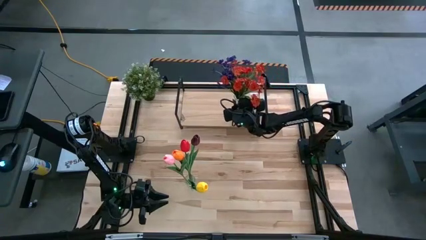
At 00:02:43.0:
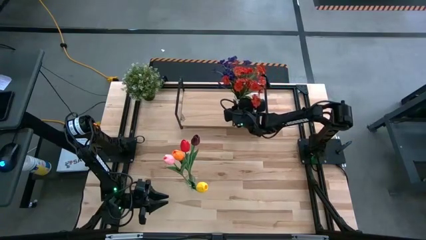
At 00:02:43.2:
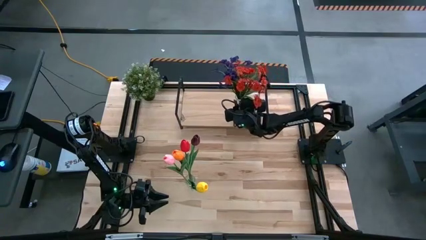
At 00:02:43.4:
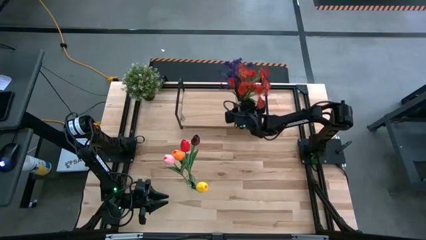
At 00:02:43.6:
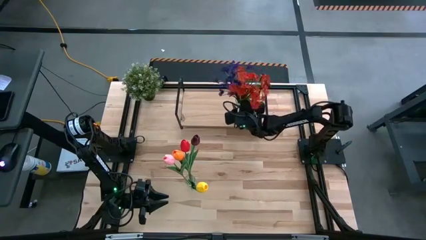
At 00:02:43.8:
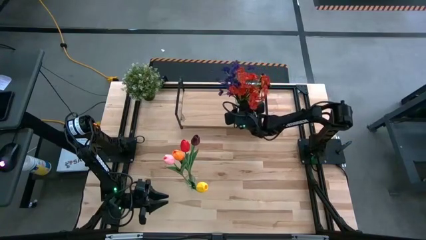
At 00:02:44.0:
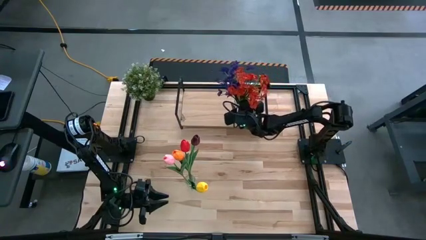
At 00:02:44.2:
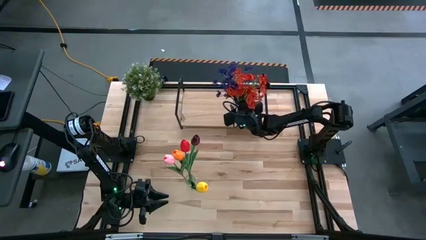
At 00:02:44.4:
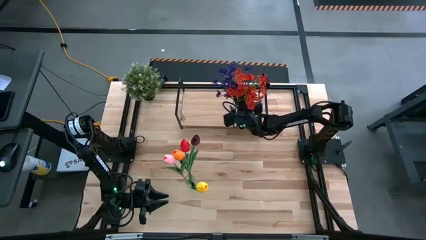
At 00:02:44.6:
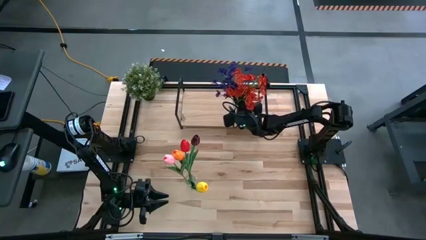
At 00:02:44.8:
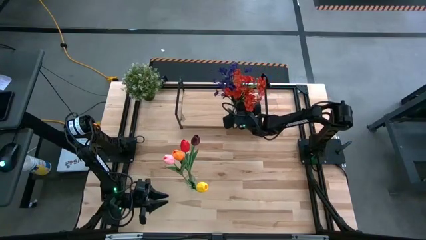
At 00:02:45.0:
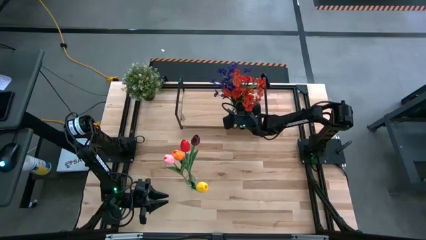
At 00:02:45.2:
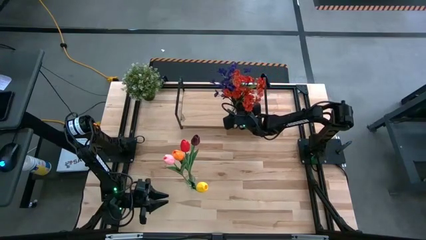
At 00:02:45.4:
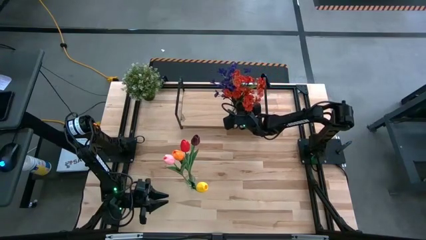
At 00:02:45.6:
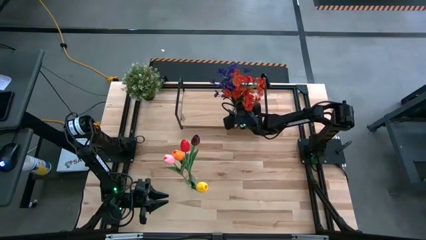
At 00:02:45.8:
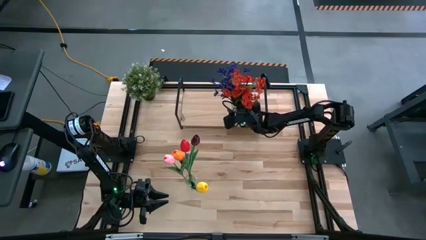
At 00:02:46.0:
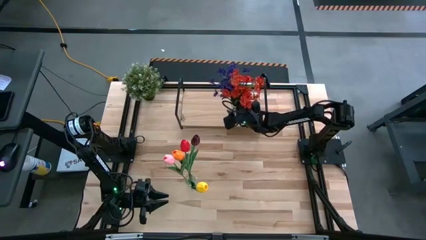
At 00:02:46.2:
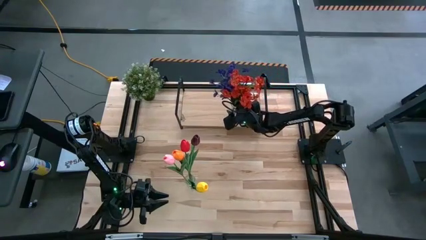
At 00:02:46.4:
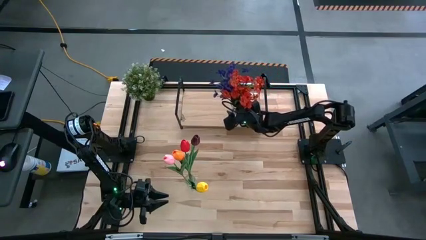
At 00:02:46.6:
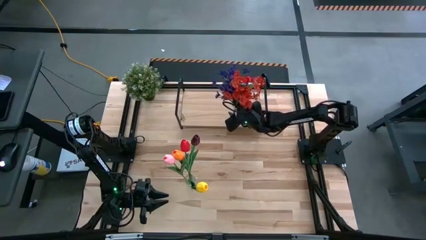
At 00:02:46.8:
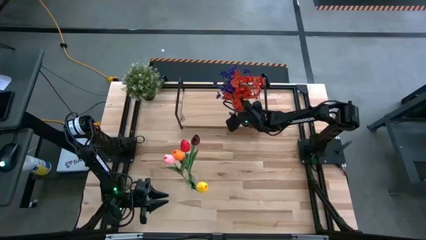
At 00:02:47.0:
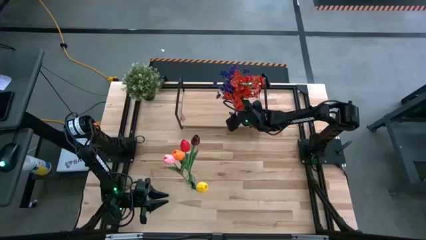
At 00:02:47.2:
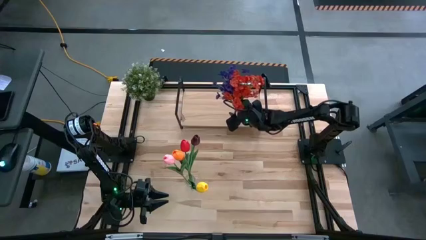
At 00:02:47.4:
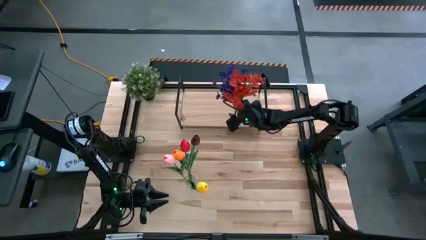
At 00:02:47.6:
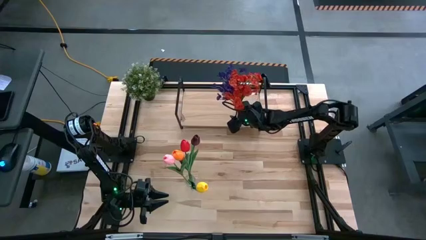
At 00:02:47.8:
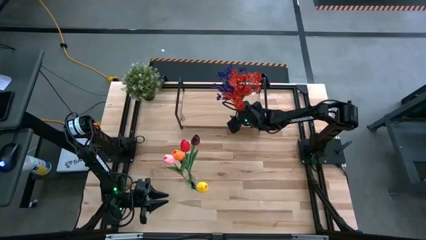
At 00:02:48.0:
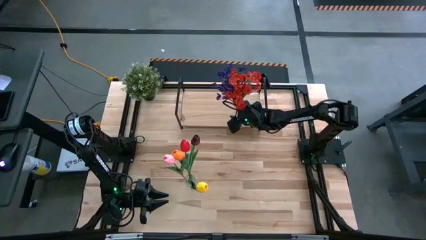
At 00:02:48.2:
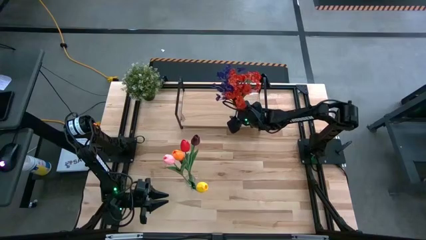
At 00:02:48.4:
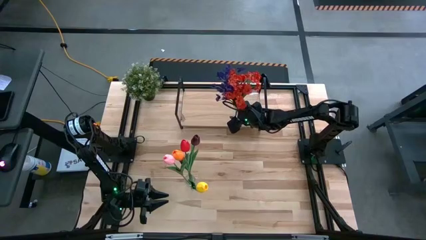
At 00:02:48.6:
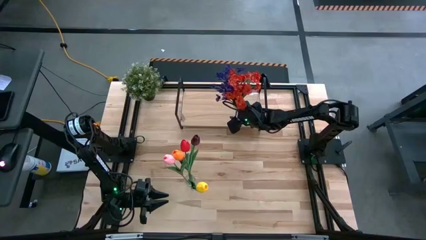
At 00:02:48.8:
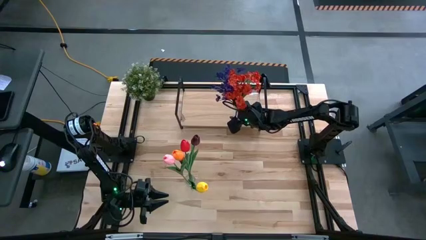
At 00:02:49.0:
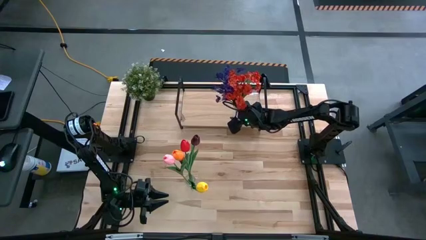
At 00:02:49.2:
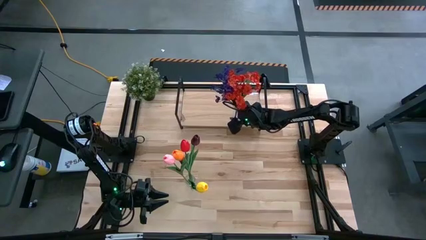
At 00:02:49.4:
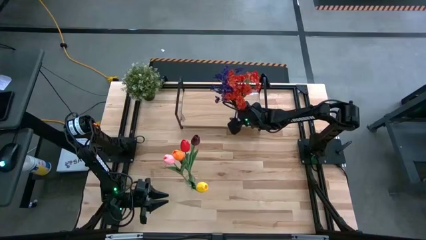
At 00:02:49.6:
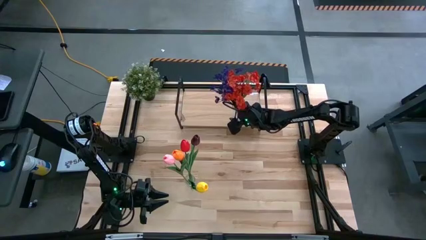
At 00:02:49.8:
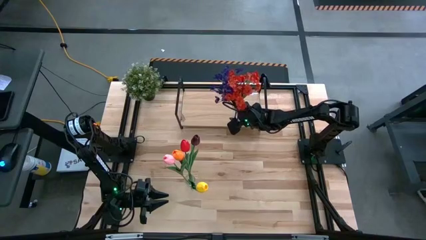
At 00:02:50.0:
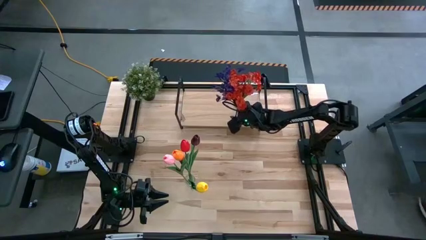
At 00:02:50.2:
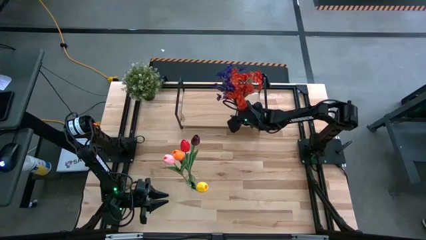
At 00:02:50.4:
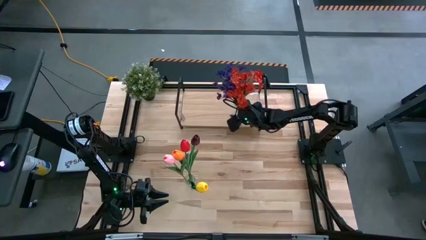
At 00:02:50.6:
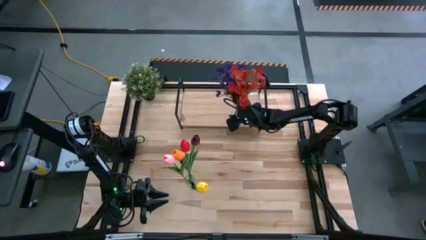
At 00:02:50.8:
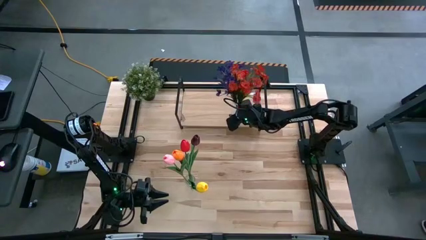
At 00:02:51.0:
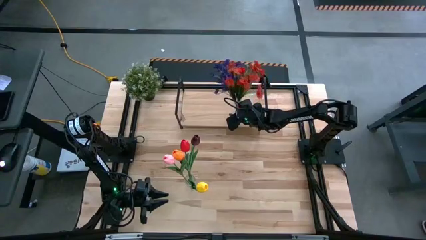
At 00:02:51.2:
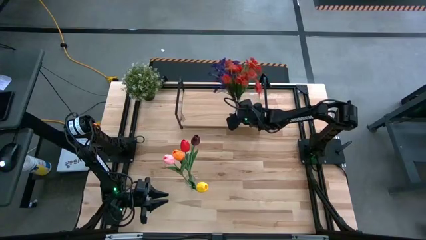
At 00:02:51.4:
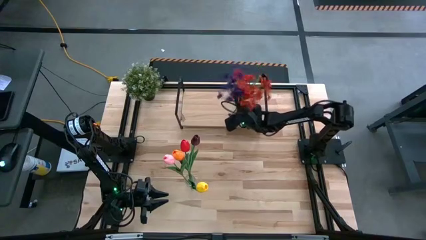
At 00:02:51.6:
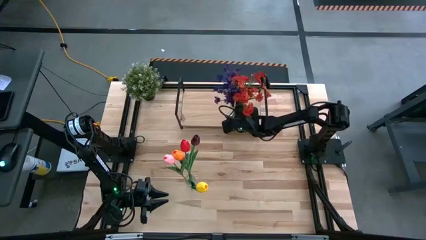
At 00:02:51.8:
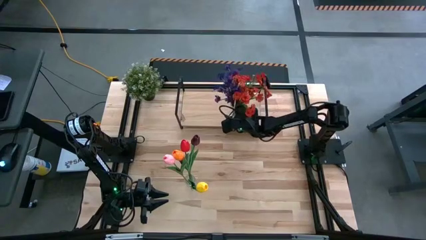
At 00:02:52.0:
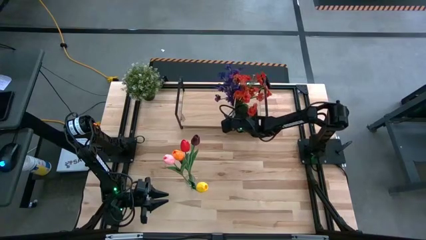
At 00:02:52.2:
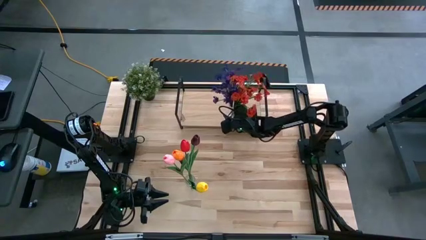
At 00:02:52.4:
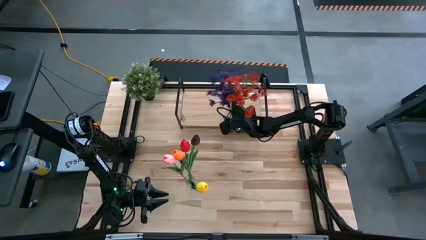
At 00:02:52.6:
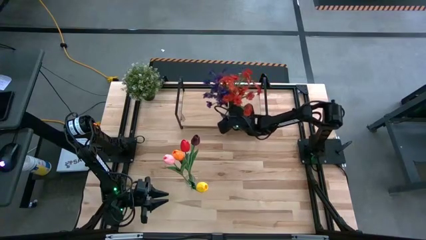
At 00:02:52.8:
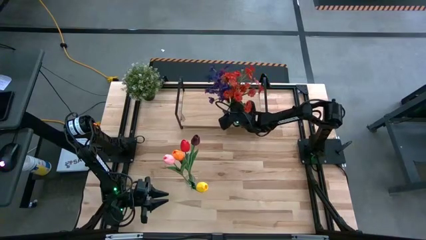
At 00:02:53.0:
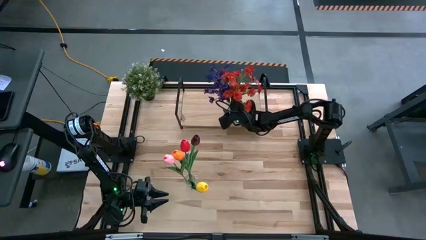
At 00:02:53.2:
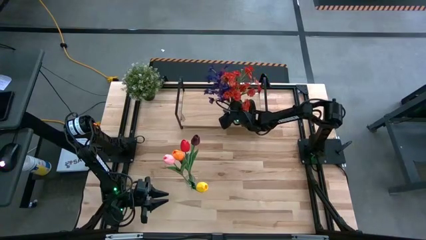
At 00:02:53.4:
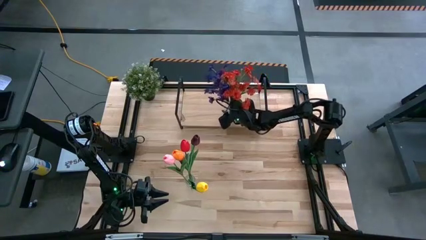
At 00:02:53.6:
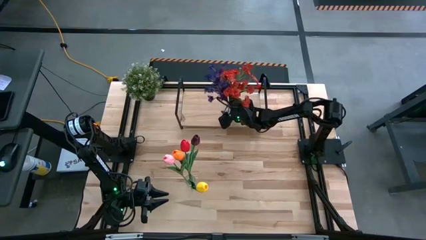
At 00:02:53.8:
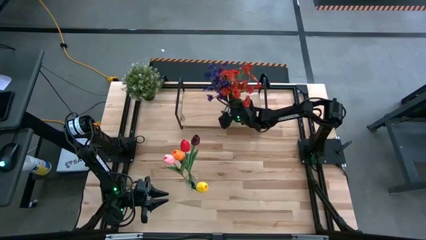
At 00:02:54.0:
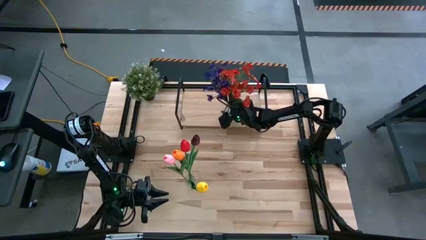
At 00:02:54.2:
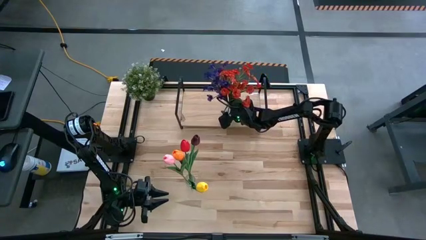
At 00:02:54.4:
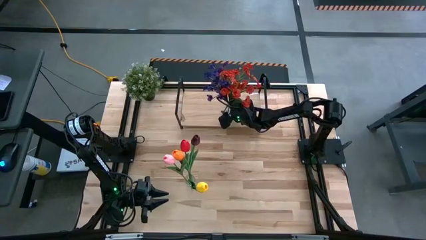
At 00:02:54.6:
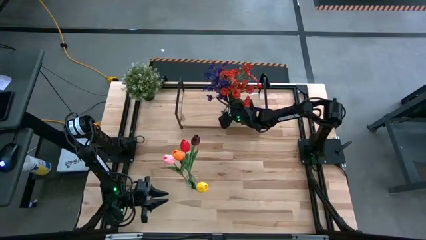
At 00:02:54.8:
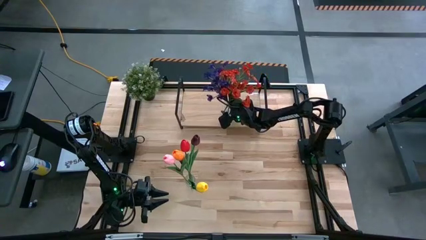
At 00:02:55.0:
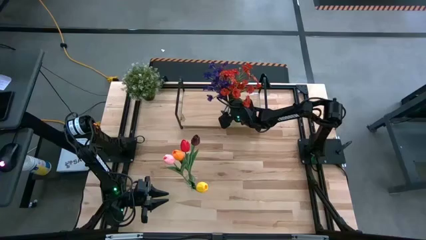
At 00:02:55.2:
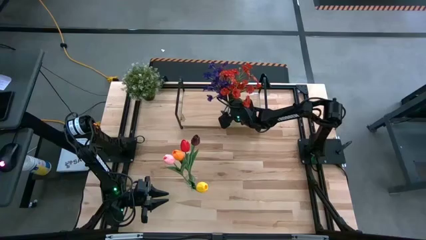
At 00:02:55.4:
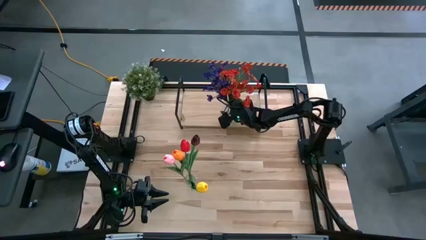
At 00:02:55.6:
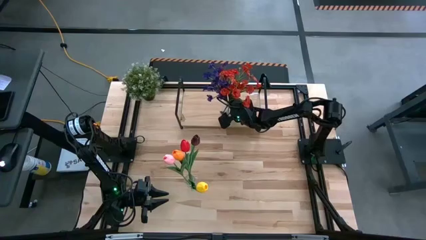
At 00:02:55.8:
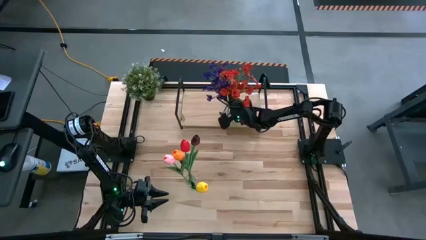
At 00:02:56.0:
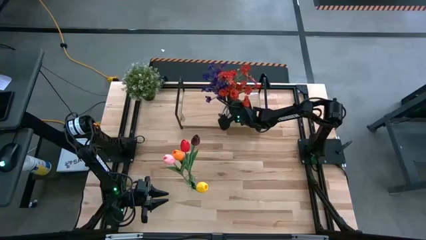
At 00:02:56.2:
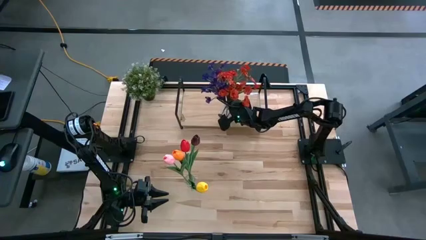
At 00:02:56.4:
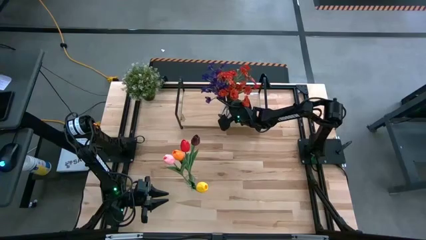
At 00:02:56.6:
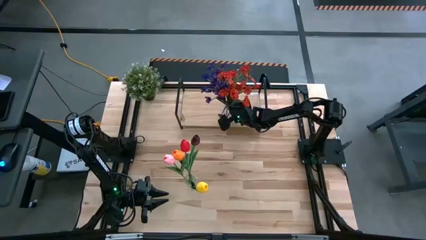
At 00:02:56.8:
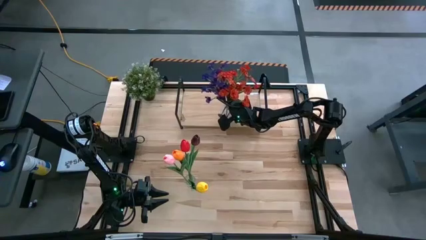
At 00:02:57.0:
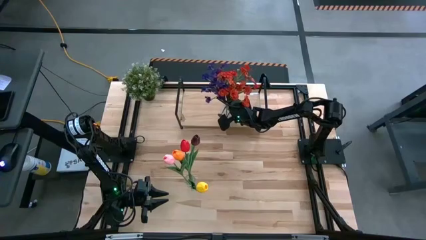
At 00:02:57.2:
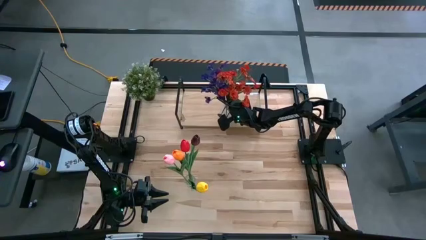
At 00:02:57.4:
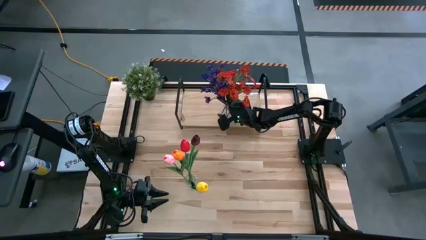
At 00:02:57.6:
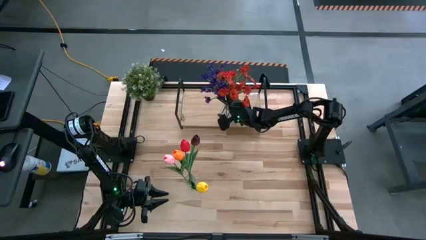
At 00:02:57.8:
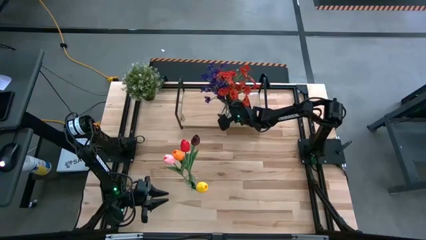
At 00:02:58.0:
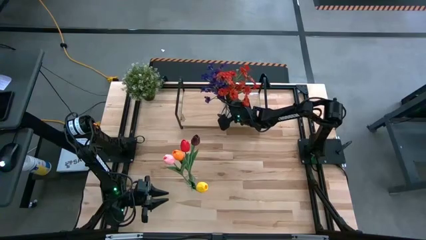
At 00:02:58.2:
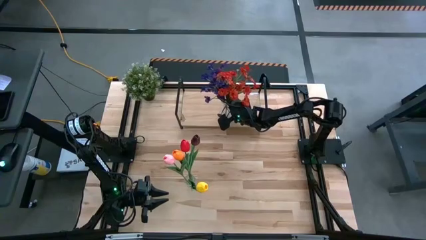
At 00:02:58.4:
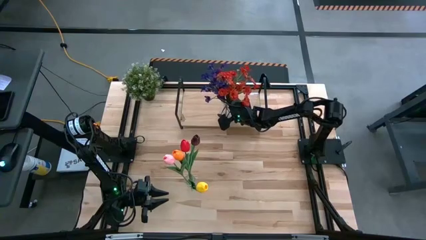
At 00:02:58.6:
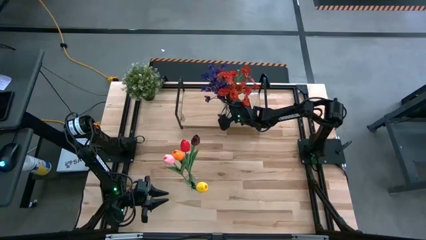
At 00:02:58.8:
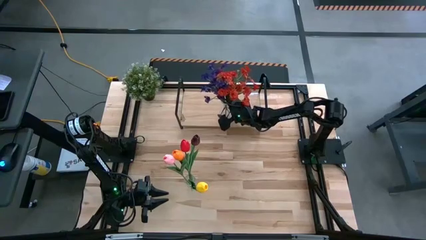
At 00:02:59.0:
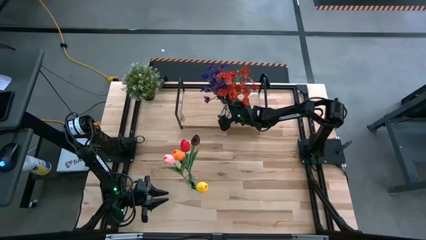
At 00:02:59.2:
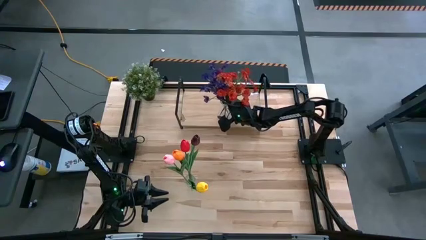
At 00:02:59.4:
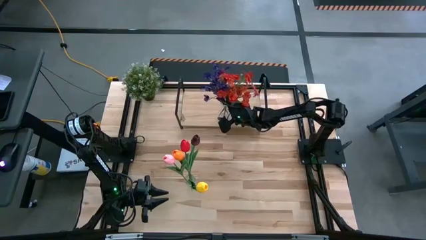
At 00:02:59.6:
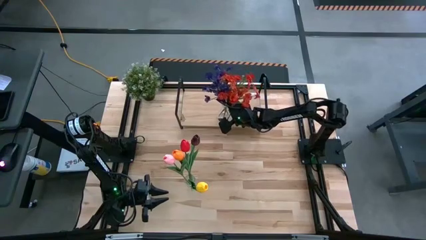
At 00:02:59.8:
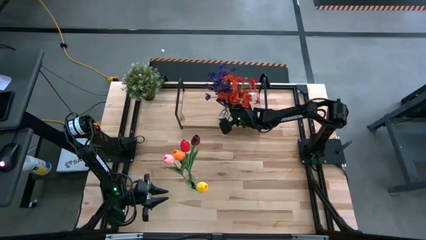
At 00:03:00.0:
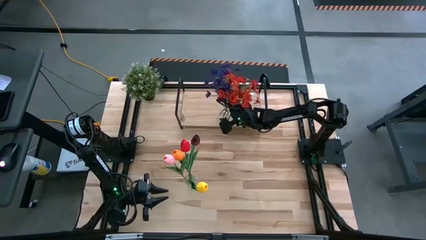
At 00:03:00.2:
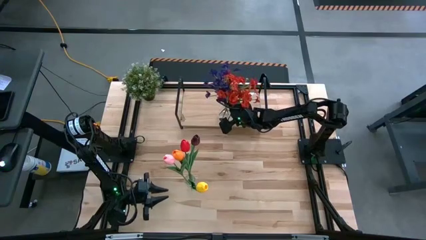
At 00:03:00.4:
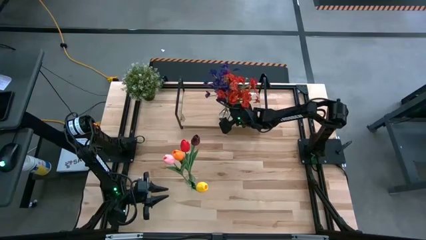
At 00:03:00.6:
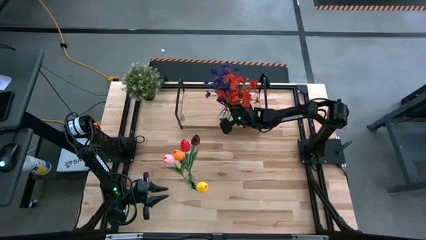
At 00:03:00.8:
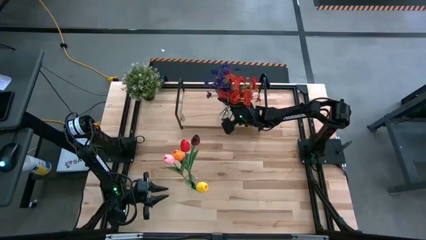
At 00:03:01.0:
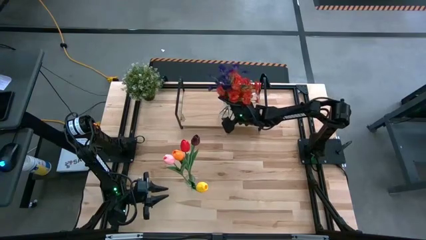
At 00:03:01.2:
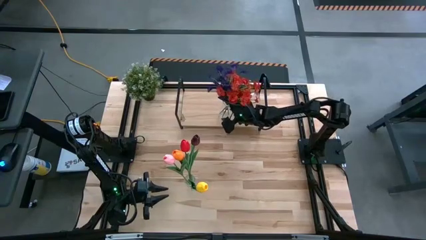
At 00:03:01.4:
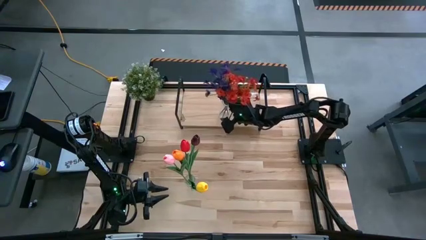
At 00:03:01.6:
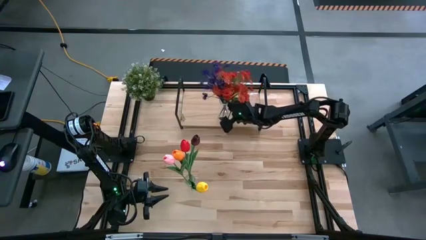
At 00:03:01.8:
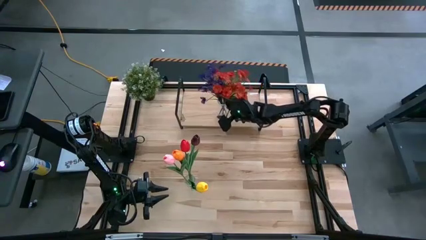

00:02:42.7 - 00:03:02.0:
Task: Pick and place flowers into a vace then onto a shelf
Put the right transparent vase with the flowers on the shelf
